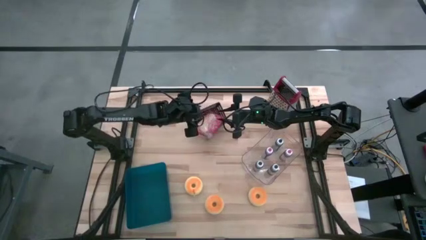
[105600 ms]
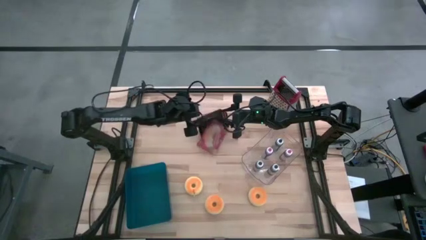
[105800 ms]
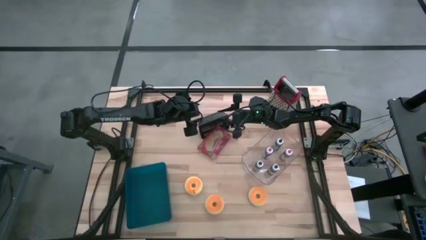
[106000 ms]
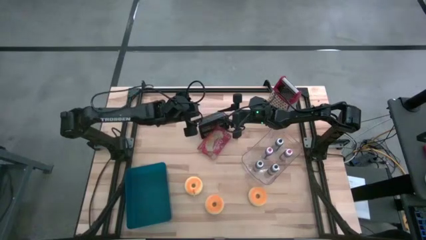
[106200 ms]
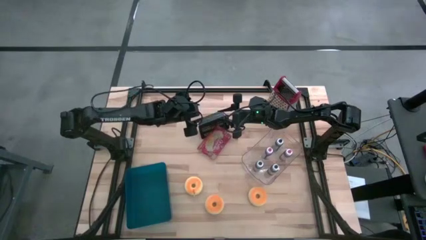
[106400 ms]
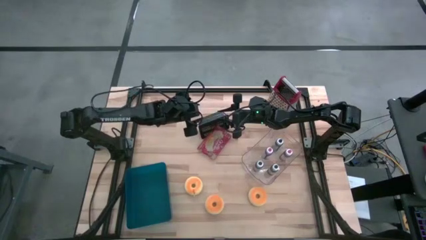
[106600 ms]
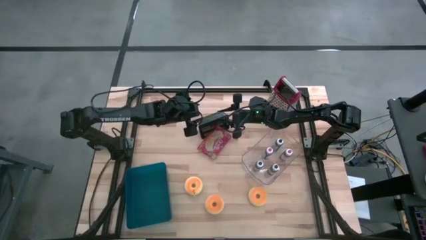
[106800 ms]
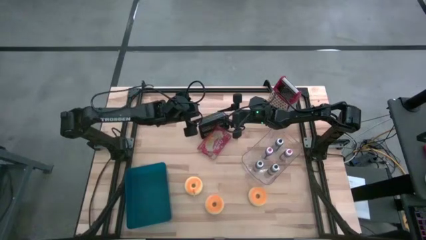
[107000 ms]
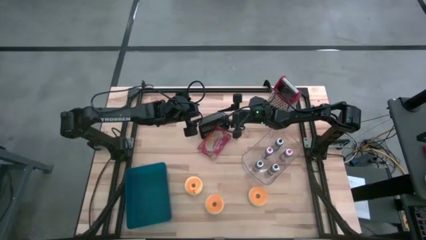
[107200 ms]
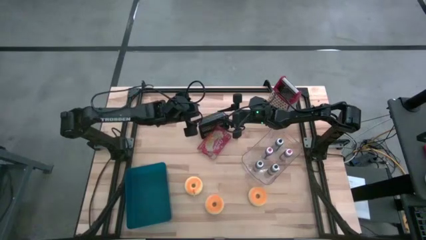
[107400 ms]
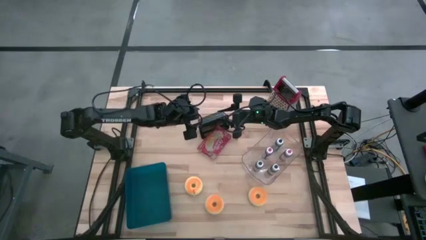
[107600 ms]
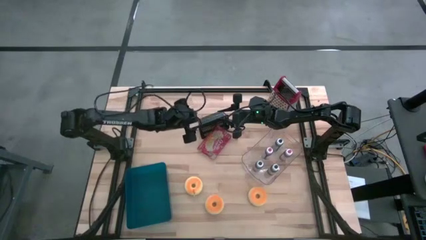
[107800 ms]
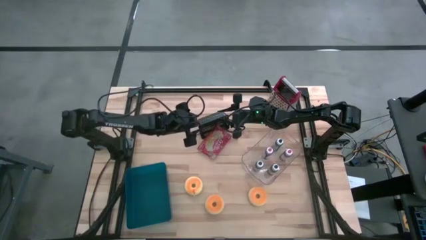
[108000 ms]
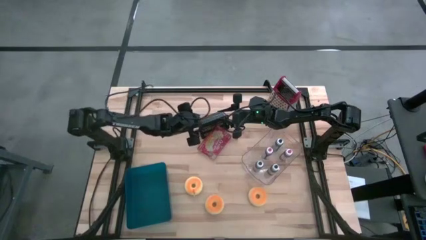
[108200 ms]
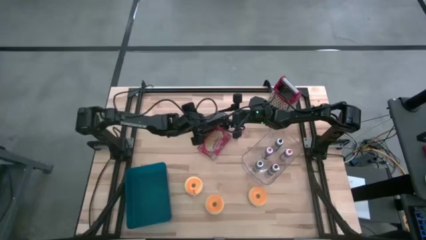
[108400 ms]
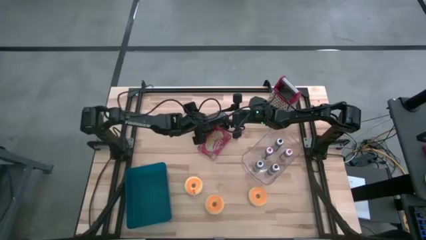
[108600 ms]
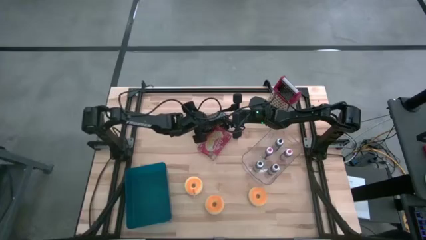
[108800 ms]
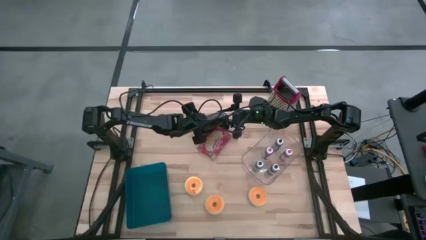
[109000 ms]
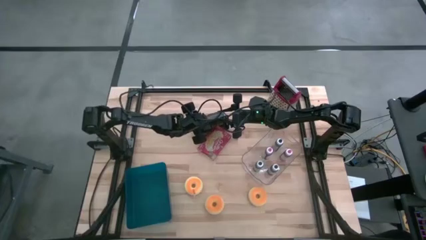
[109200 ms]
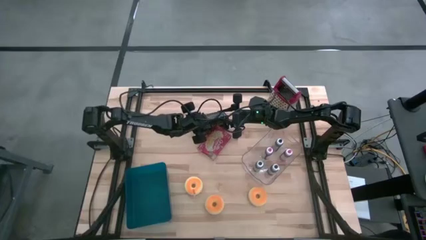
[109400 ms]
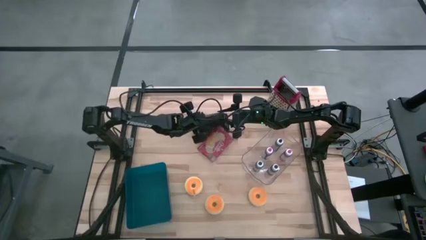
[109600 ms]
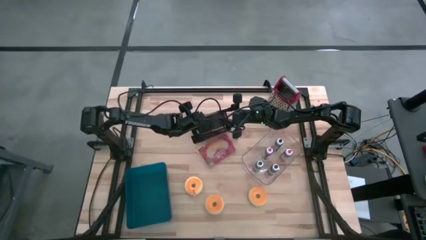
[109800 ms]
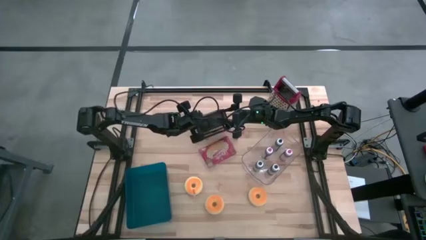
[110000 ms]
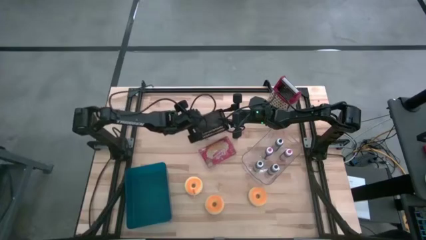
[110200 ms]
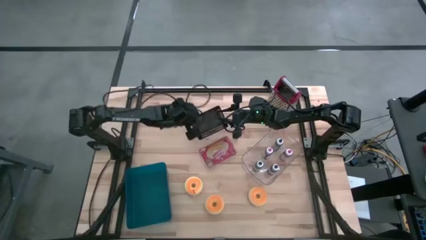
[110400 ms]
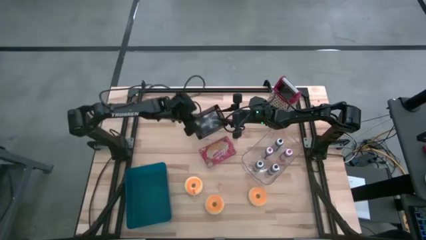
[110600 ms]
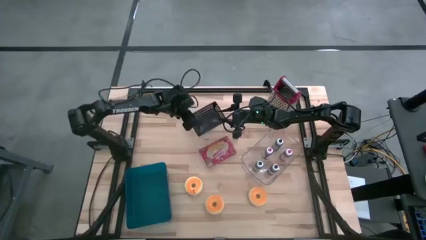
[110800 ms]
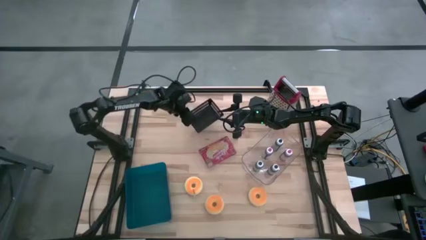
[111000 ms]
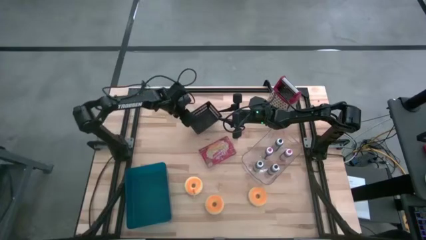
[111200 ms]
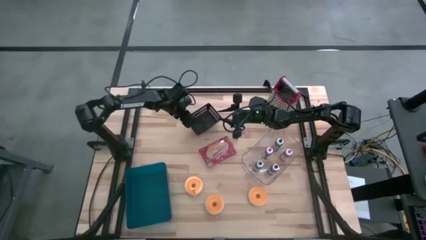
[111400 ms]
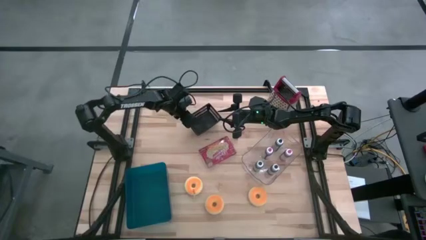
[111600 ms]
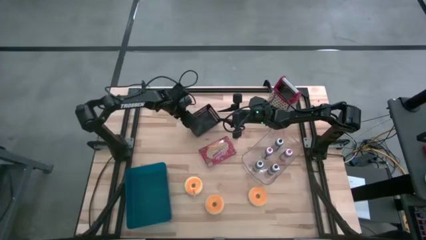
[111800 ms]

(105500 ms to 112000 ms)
Task: Pick & Place Food Item
Adjust the black bin

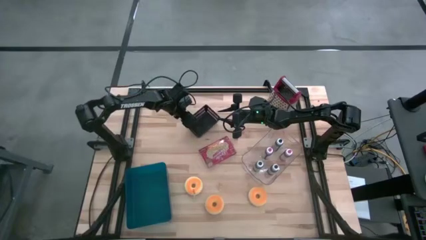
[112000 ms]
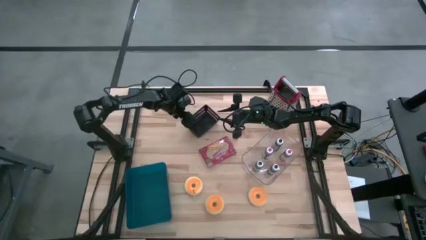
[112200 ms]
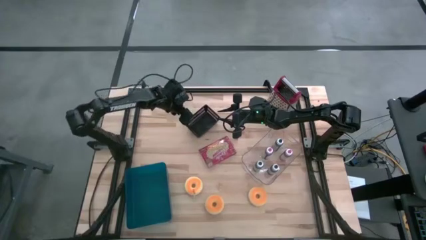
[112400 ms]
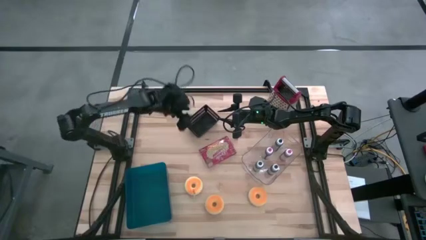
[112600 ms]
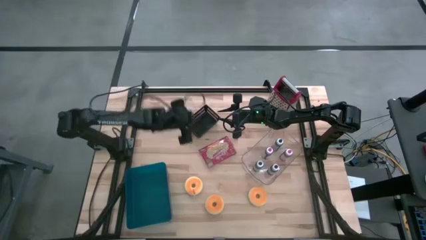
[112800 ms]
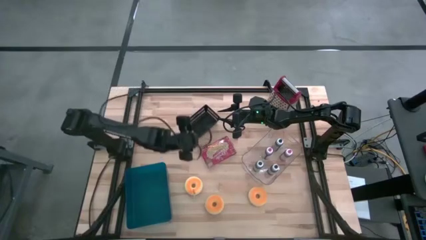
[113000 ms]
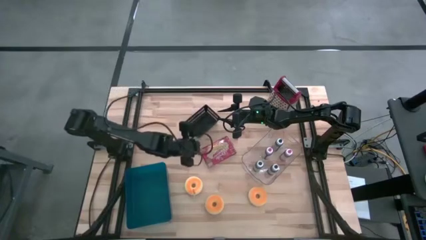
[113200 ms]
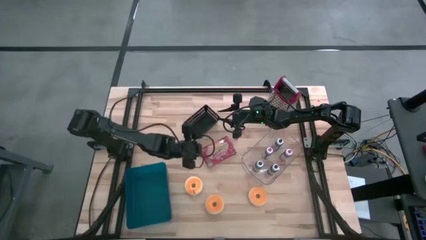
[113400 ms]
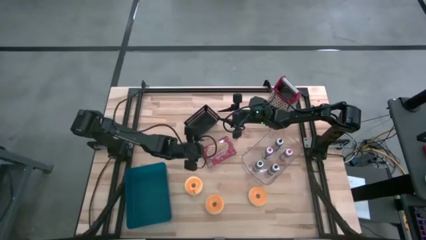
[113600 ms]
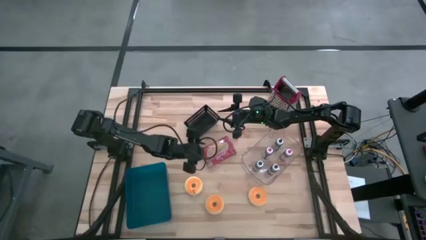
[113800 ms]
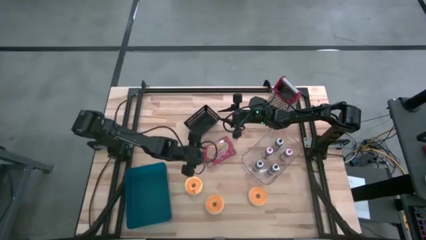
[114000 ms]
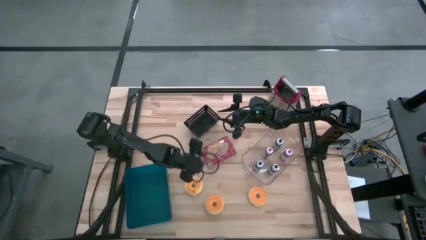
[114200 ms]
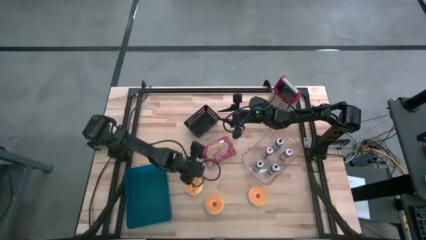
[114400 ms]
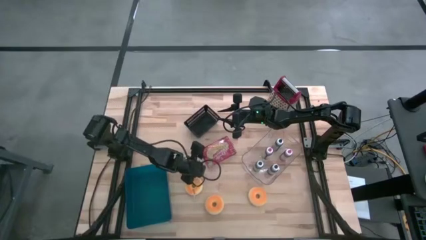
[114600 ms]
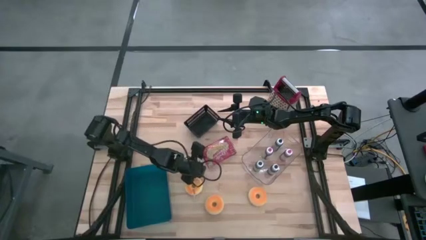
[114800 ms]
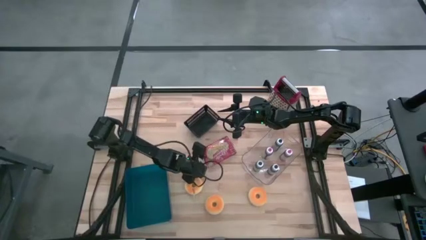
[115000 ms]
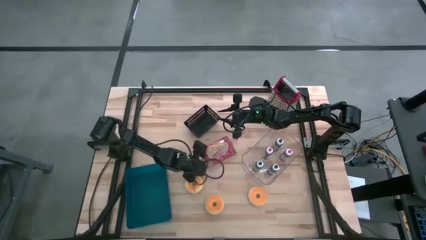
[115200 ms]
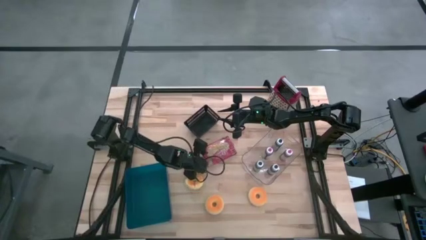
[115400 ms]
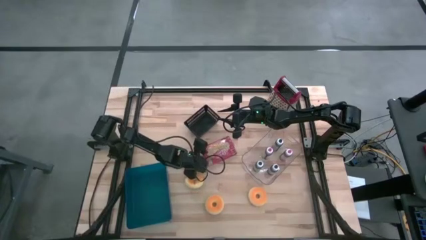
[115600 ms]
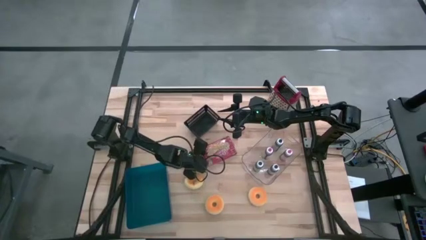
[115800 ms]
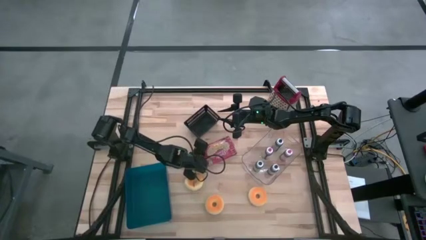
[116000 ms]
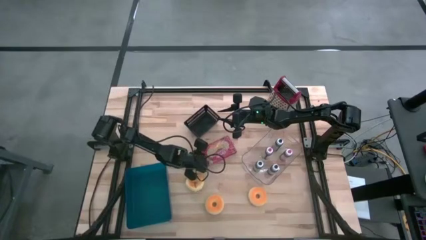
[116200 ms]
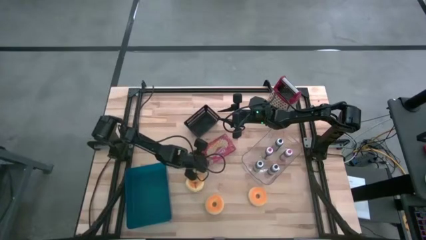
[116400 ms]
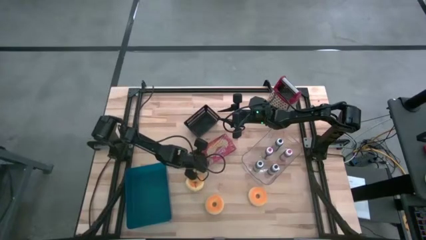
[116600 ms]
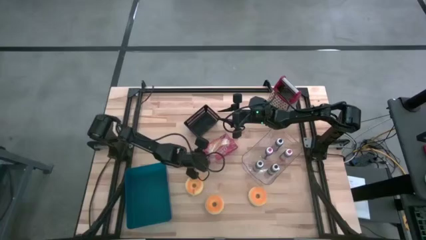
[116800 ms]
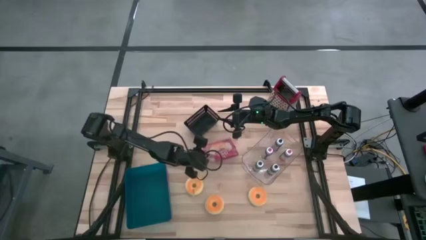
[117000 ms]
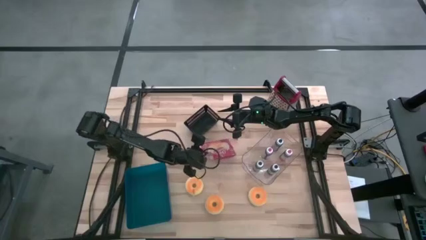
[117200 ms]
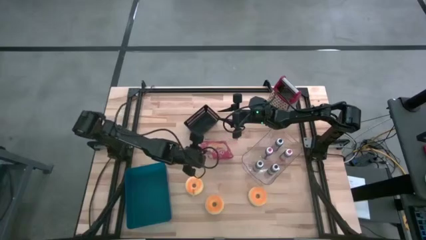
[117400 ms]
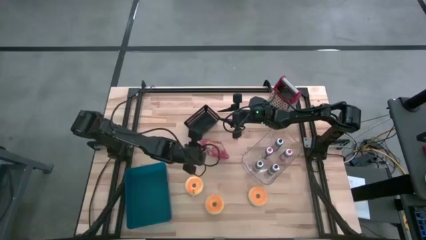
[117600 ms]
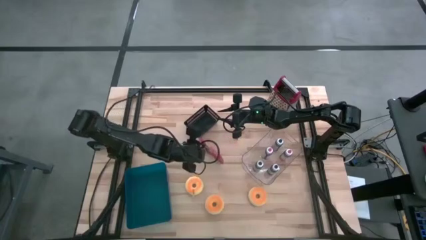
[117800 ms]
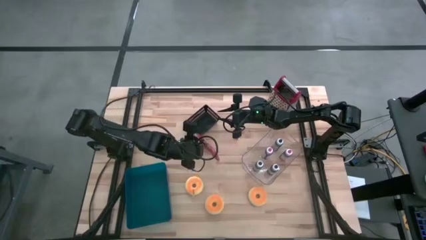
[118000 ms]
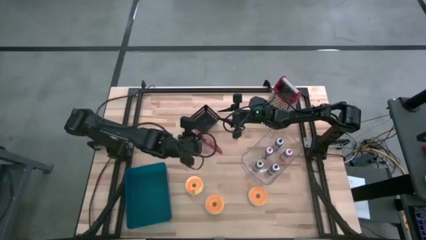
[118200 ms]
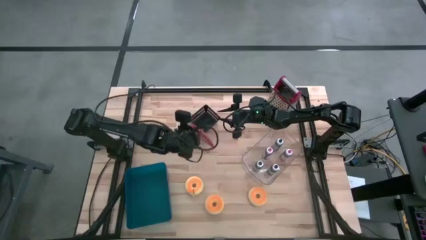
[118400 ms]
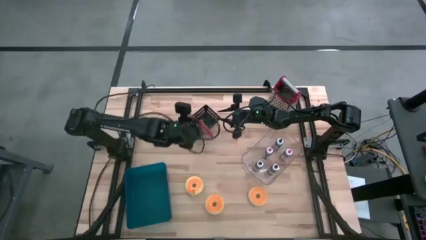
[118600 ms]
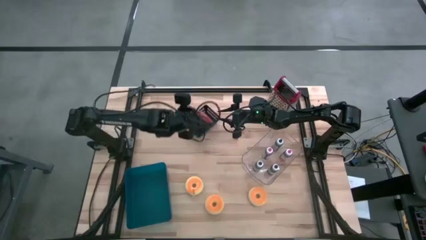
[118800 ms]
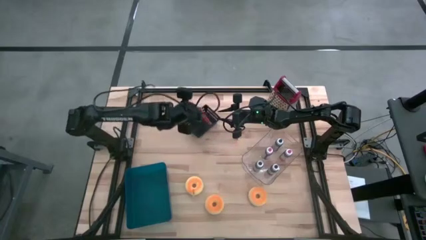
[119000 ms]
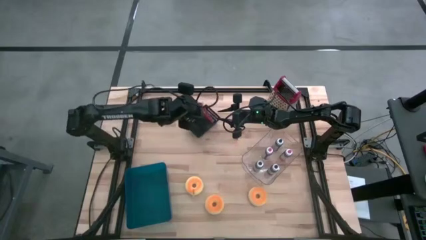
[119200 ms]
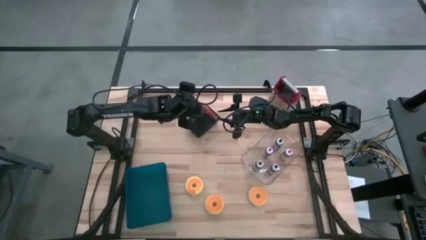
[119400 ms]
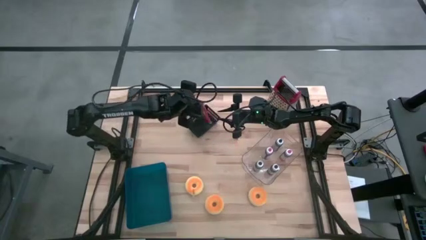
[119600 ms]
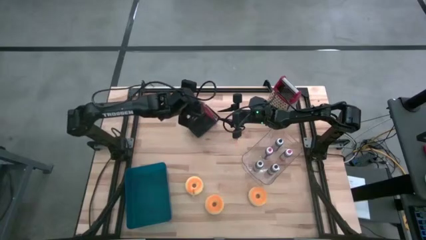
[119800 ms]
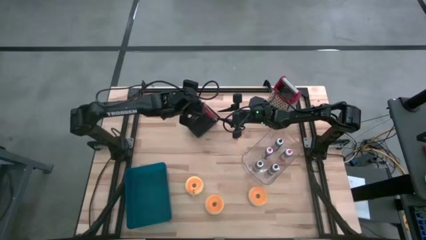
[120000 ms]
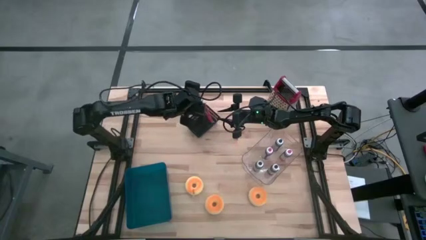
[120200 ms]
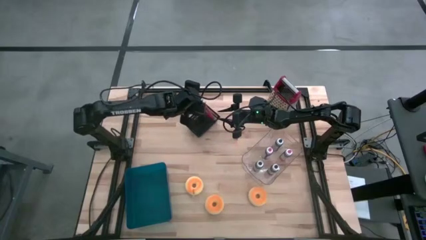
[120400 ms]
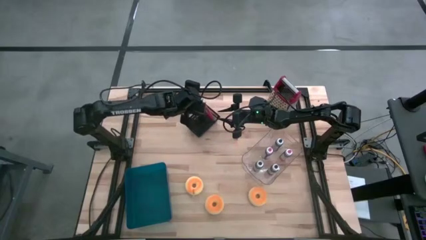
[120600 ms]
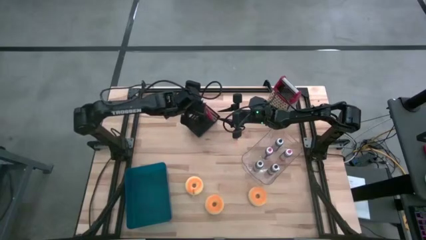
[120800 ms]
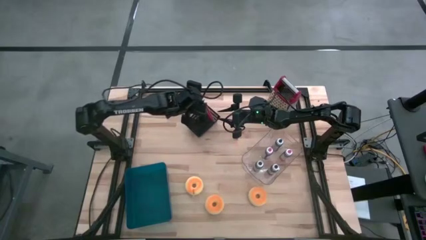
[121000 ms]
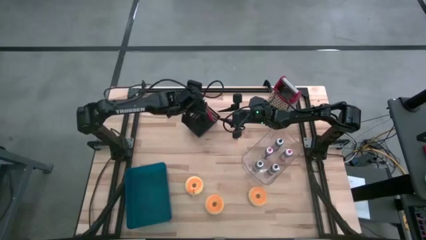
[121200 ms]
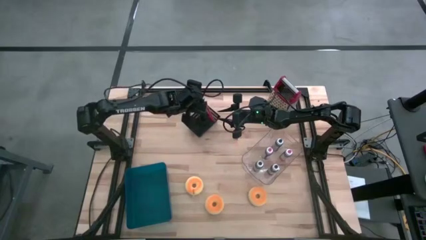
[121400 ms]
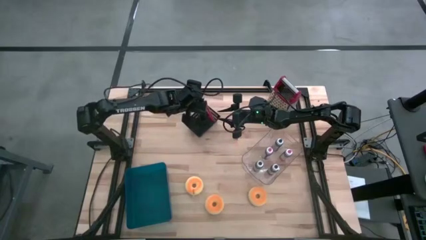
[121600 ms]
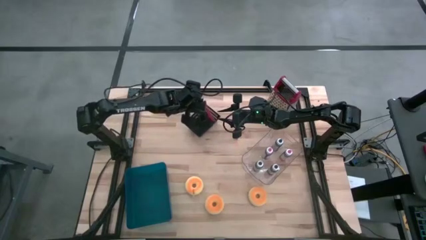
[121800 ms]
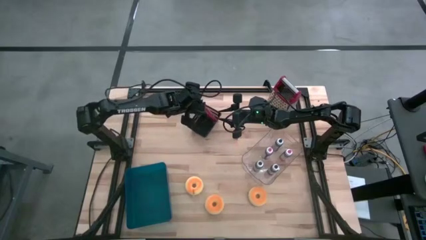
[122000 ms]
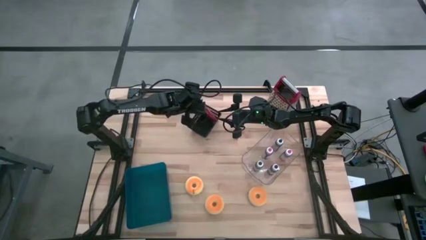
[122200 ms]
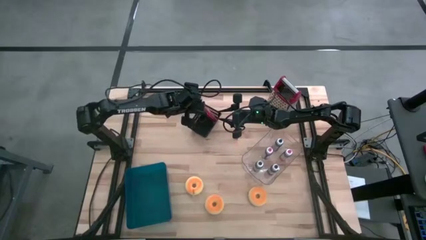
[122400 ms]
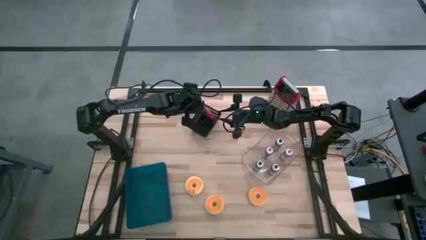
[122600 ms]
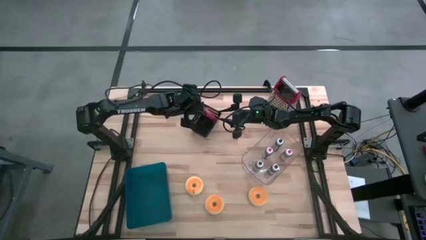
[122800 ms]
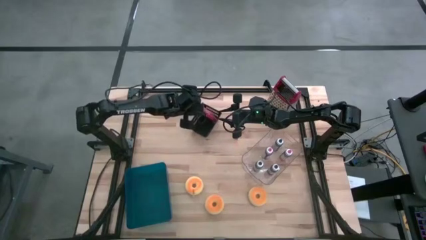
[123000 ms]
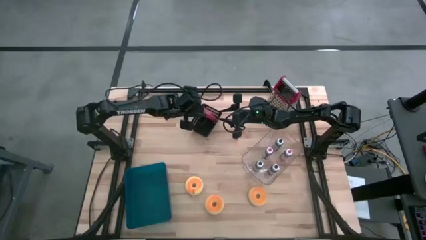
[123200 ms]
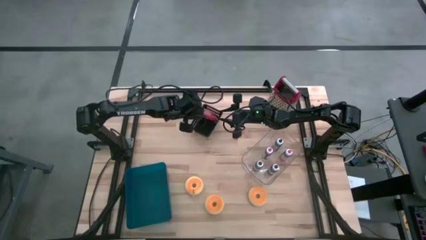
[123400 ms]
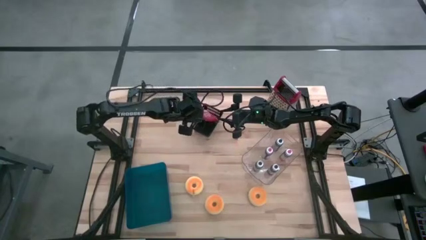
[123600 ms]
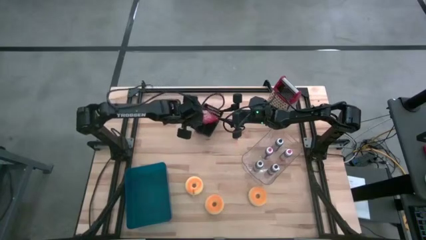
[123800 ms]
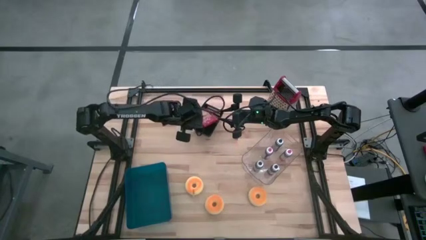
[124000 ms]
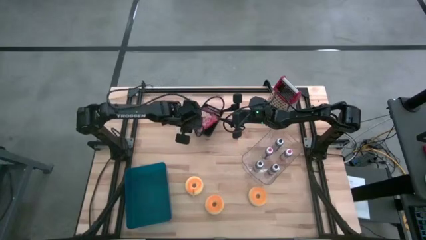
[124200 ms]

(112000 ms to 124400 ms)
Put the red popcorn bag into the black bin
